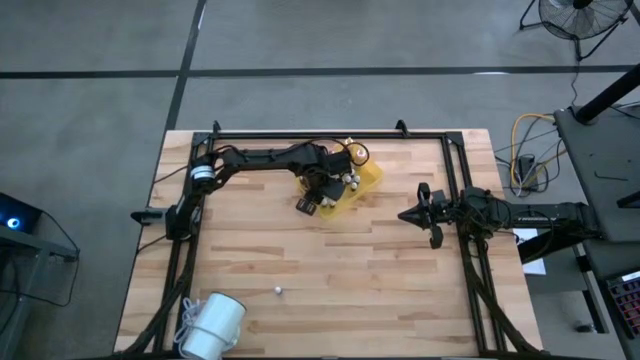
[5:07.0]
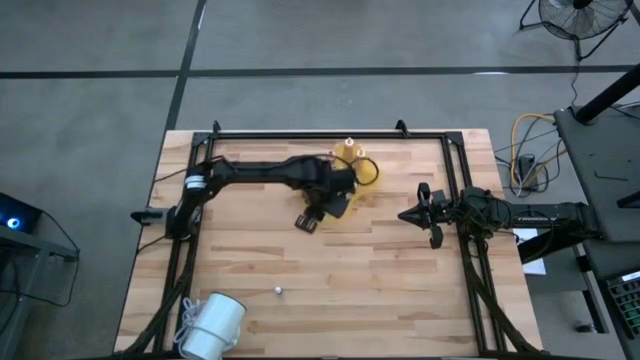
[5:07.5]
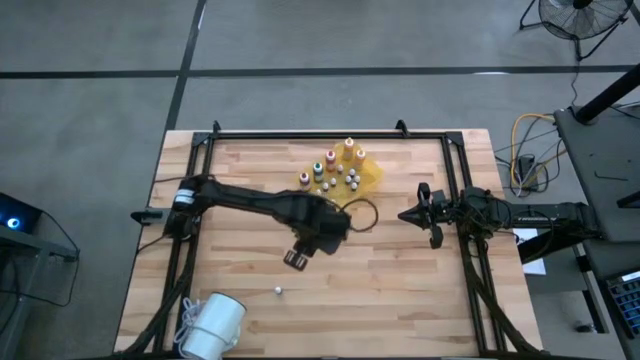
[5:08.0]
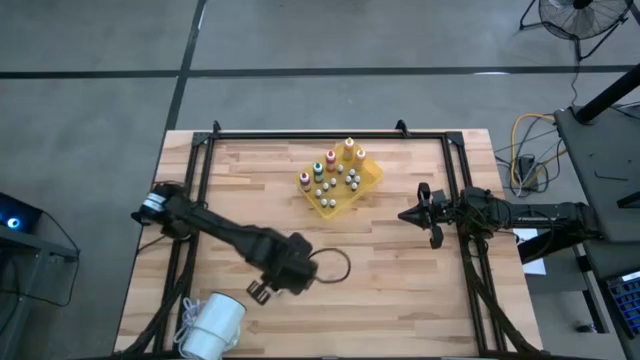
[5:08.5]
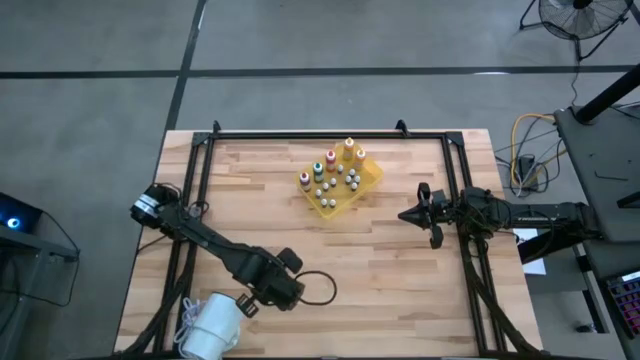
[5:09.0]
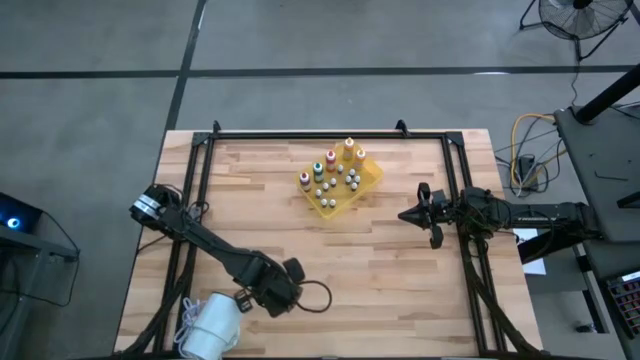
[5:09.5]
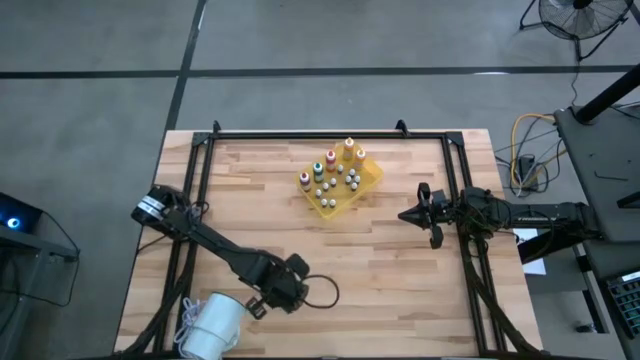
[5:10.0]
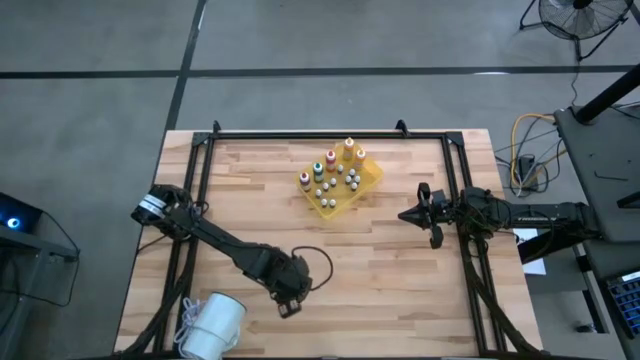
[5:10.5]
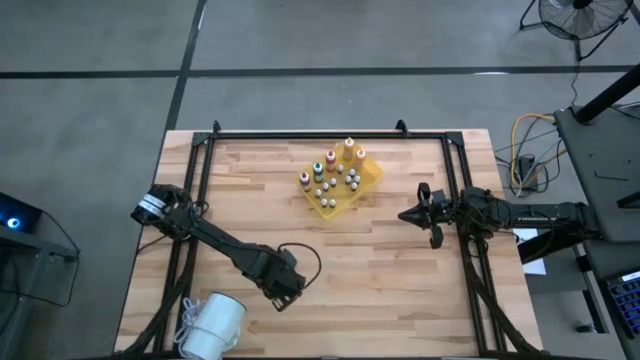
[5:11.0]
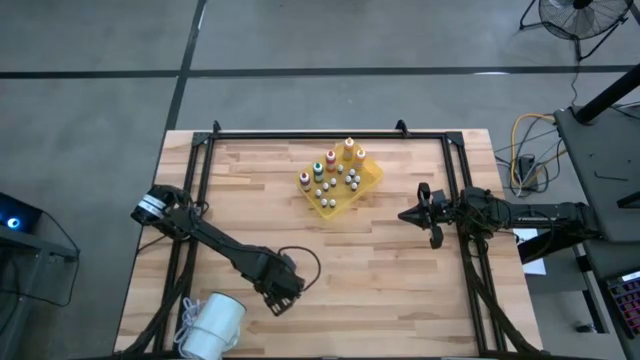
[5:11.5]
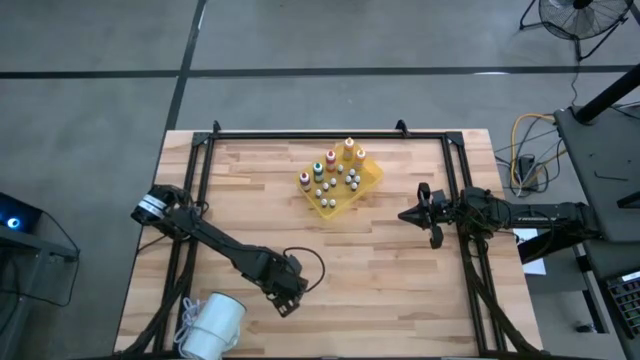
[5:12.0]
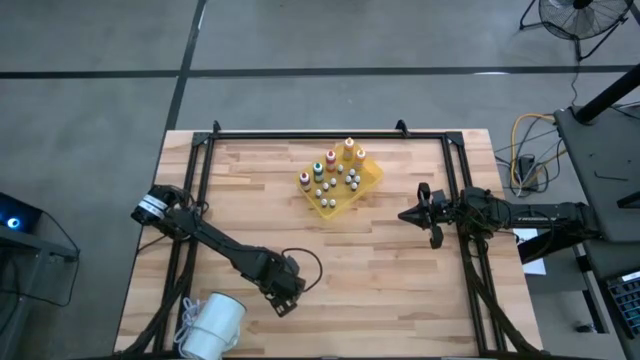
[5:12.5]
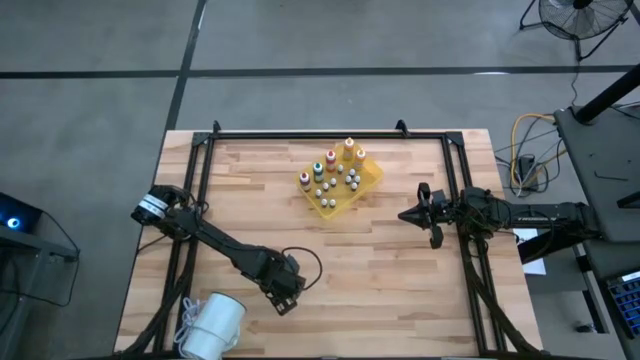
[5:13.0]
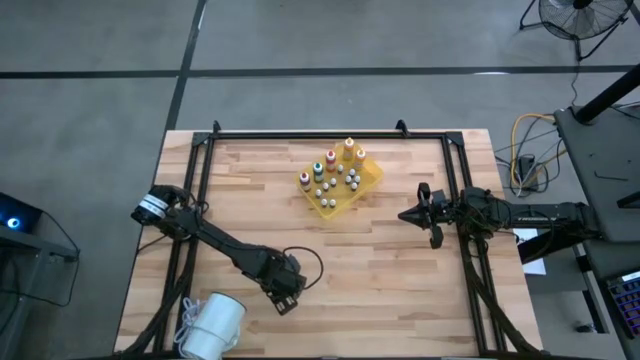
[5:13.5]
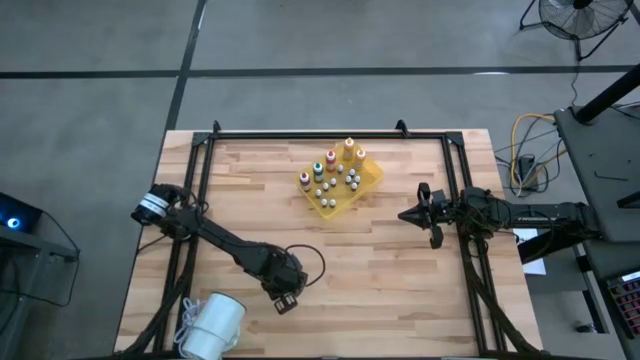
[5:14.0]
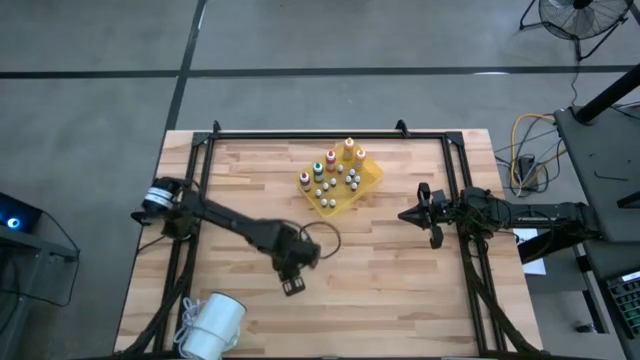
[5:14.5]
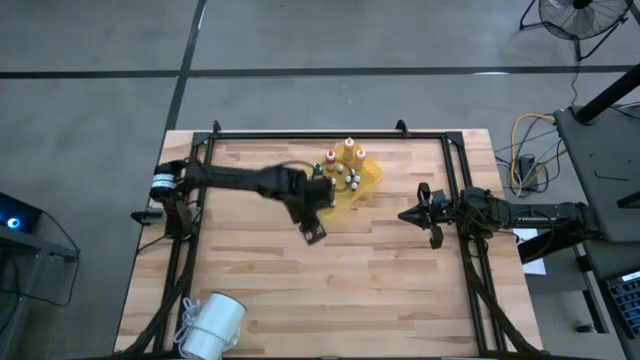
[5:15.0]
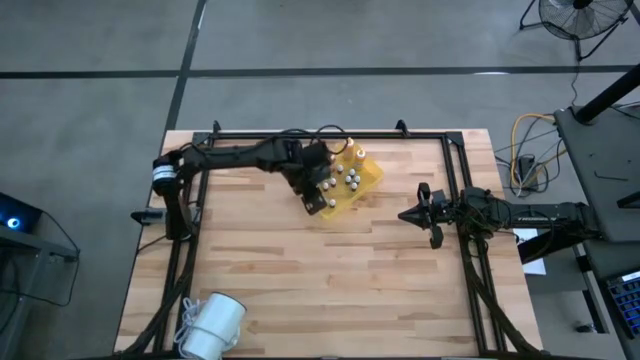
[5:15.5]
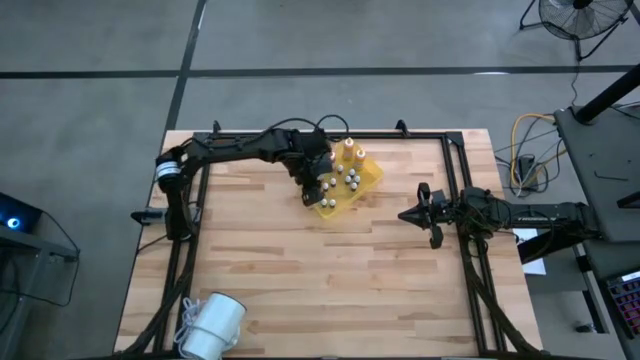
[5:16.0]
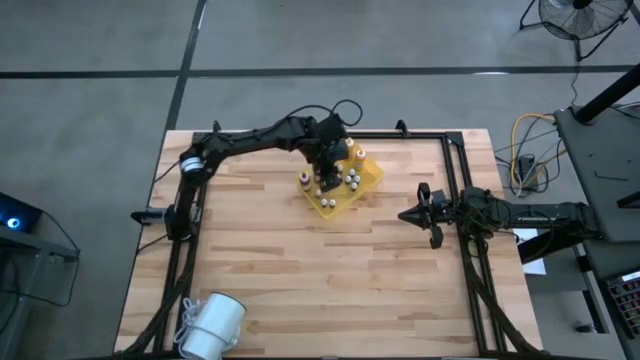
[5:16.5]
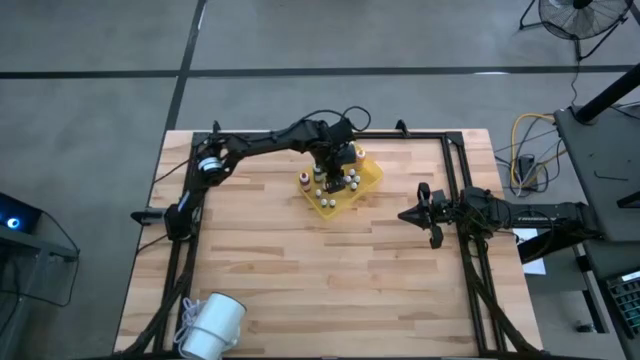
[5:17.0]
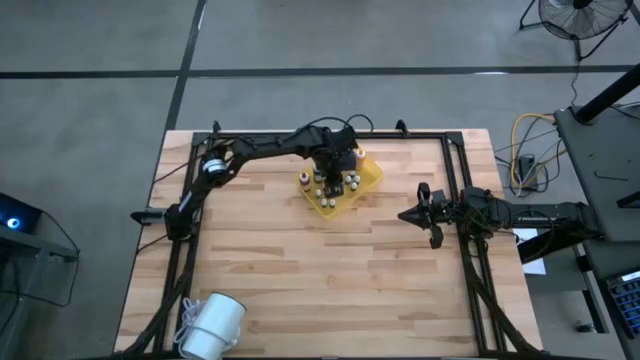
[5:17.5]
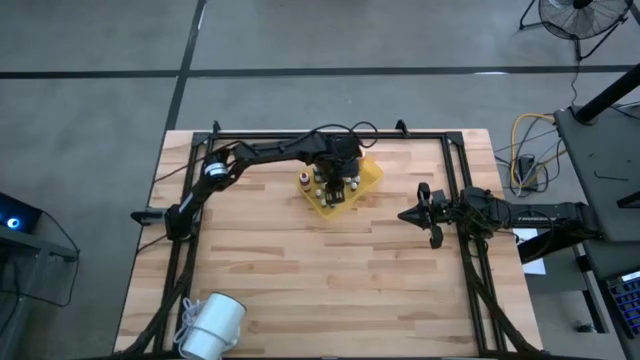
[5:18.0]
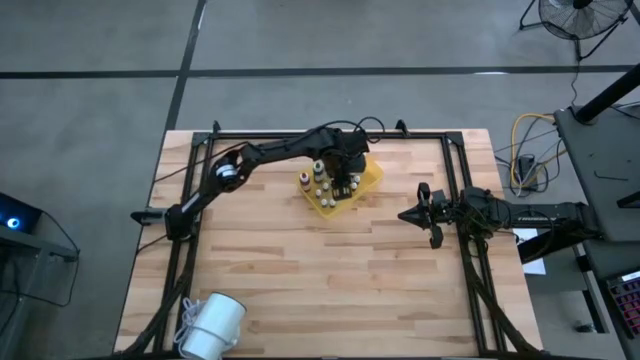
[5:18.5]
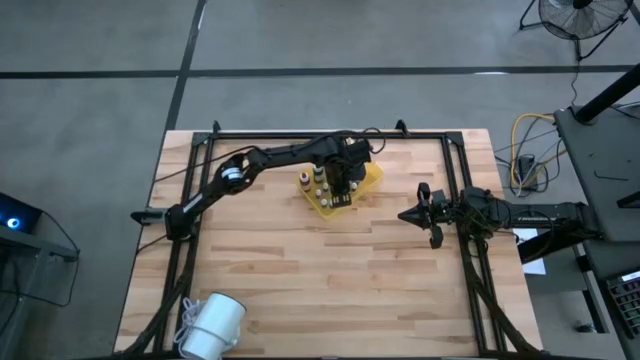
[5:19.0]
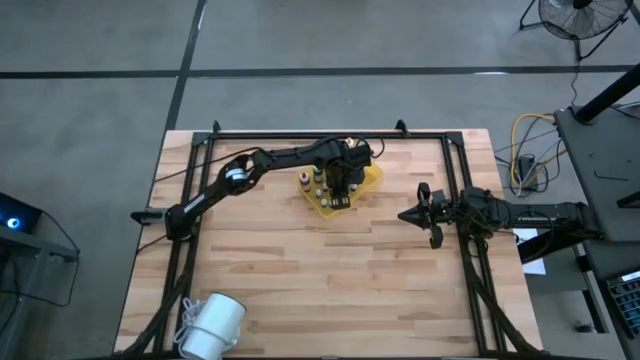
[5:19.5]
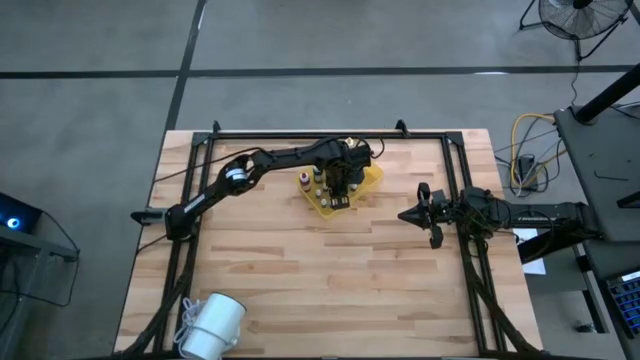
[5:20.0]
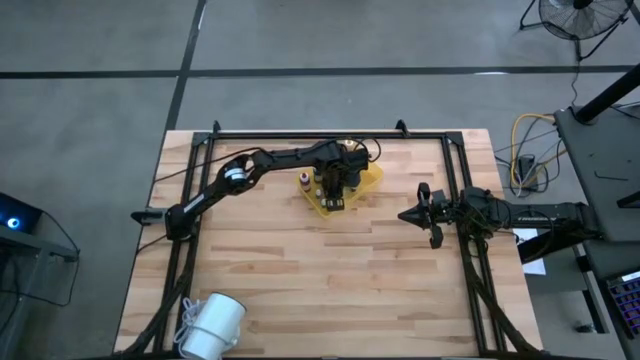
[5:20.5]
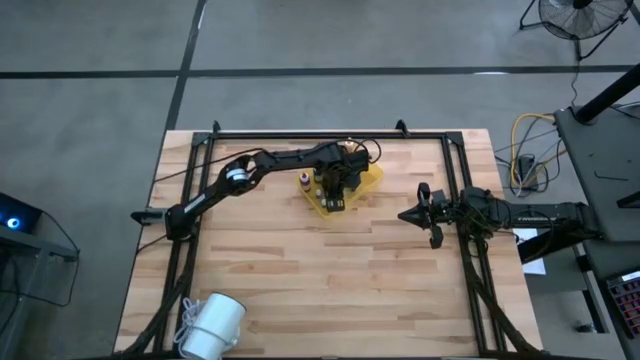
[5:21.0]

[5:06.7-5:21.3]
Task: Pick & Place food coloring
Put the small black food coloring bottle into the yellow bin
